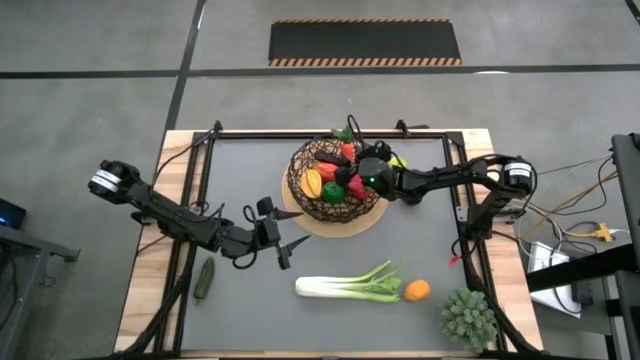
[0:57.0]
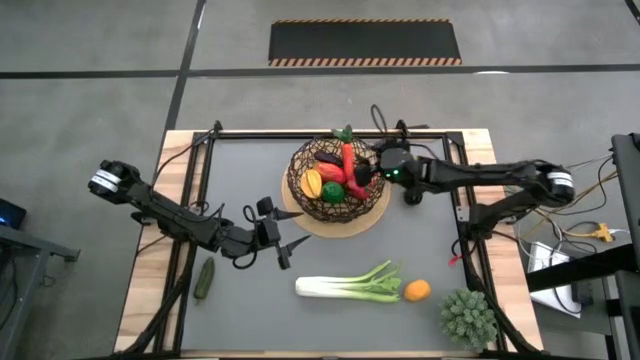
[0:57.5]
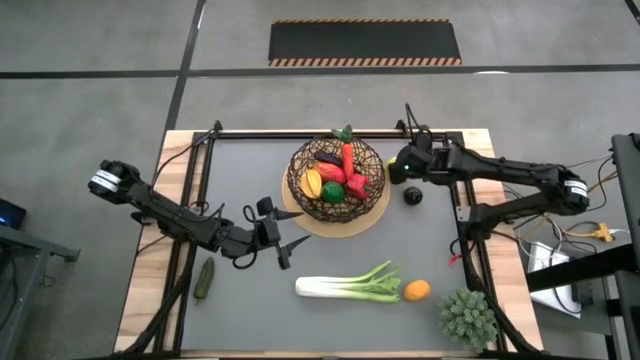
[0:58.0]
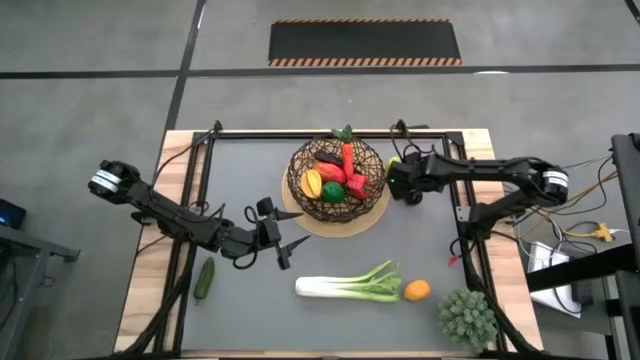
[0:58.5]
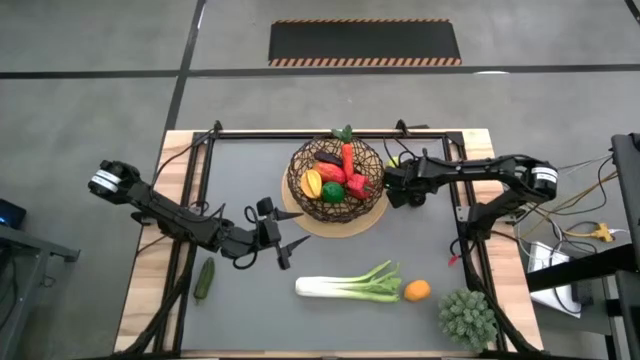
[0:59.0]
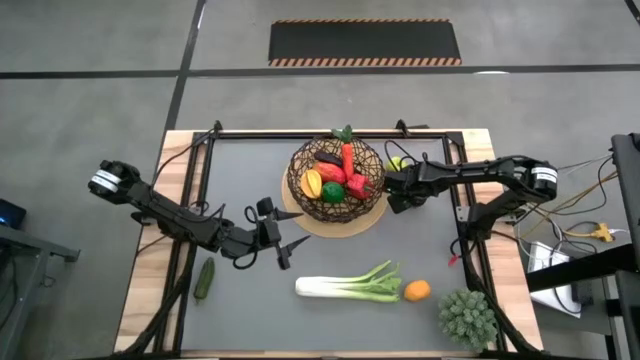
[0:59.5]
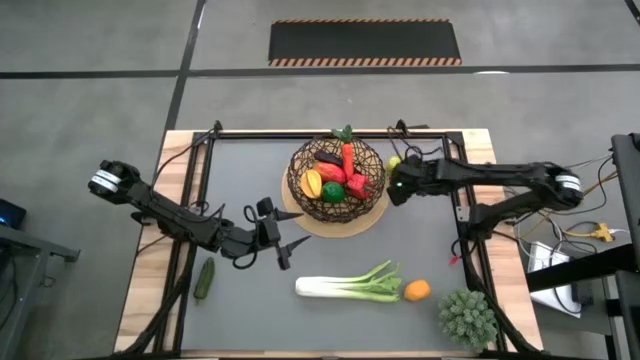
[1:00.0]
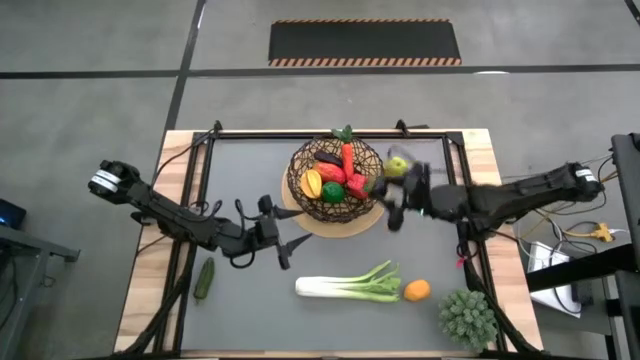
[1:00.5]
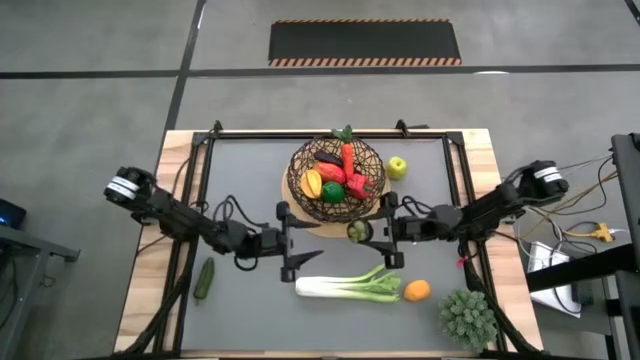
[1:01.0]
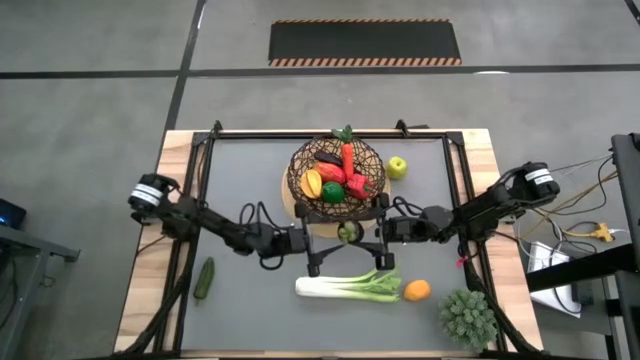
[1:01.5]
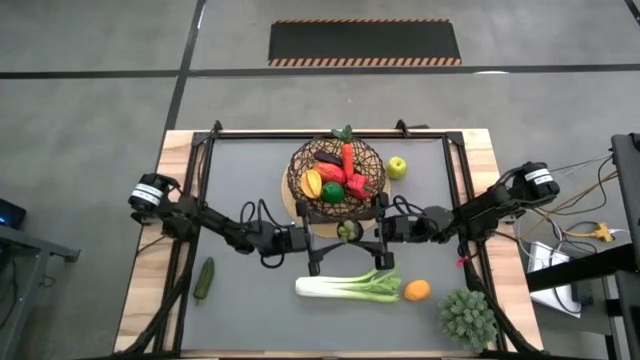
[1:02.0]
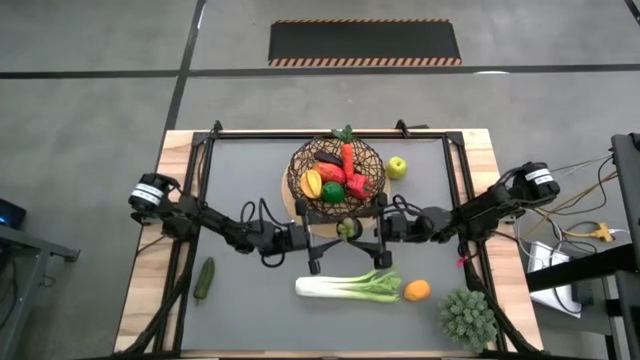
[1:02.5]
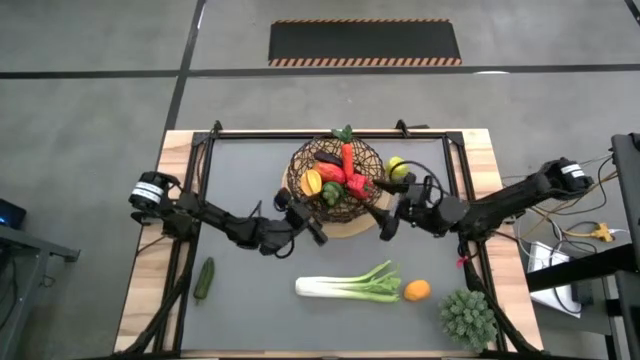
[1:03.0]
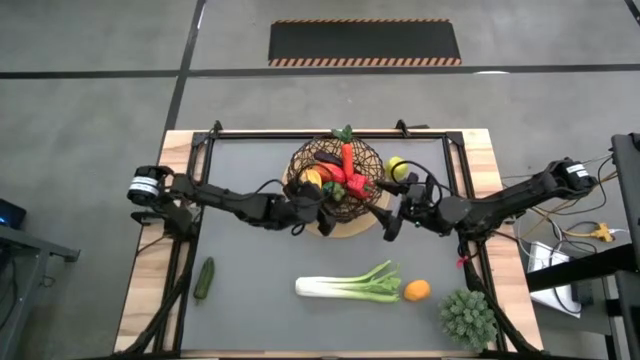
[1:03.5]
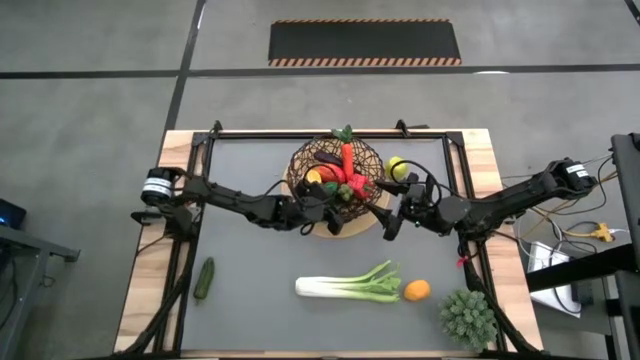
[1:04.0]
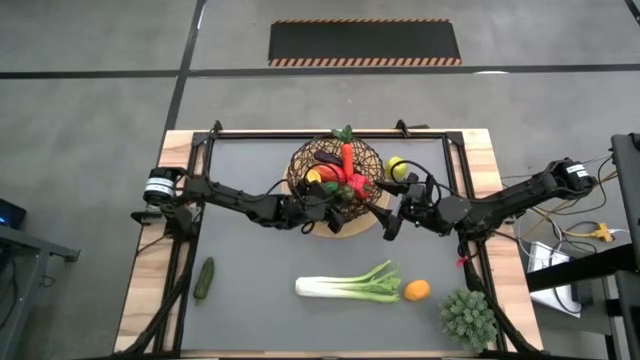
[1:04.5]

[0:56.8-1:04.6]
Task: Build produce basket
Put the plum into the basket

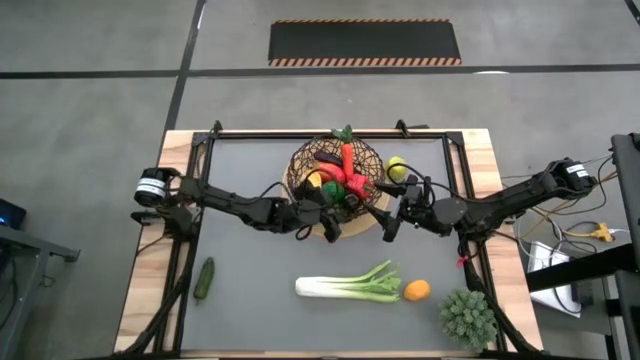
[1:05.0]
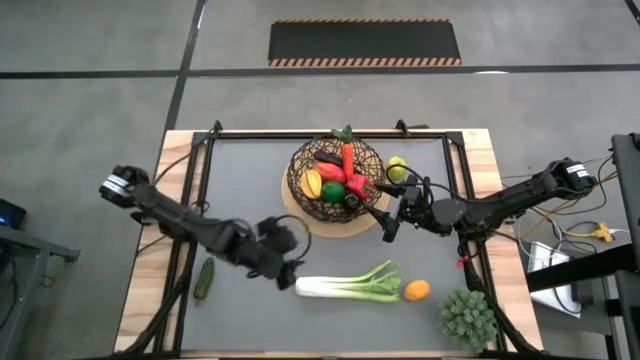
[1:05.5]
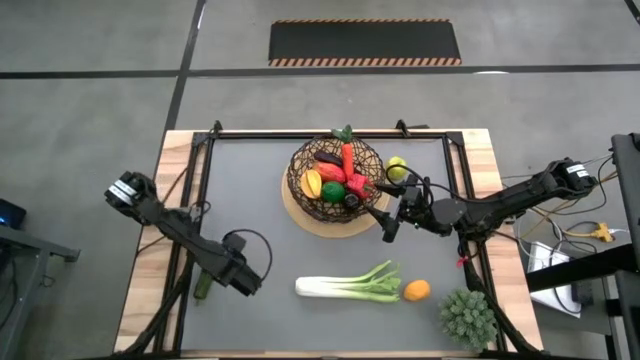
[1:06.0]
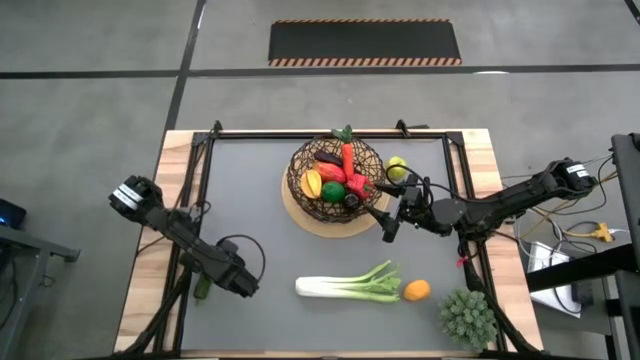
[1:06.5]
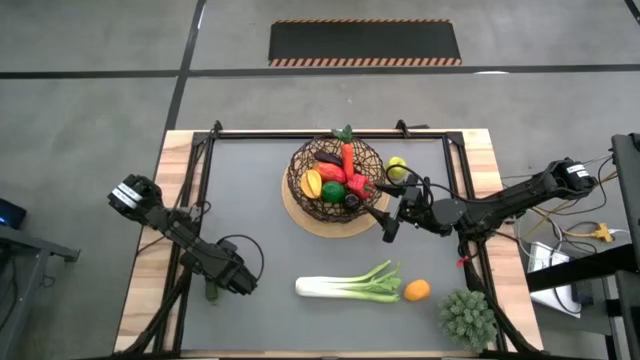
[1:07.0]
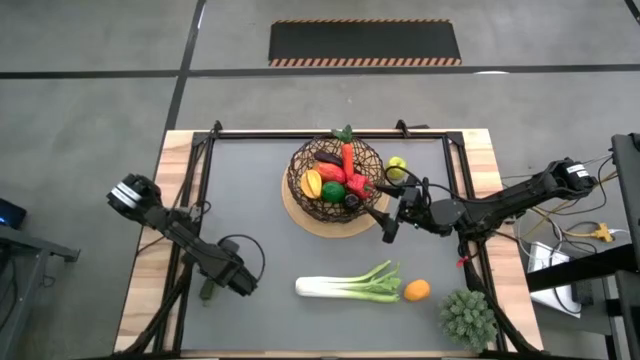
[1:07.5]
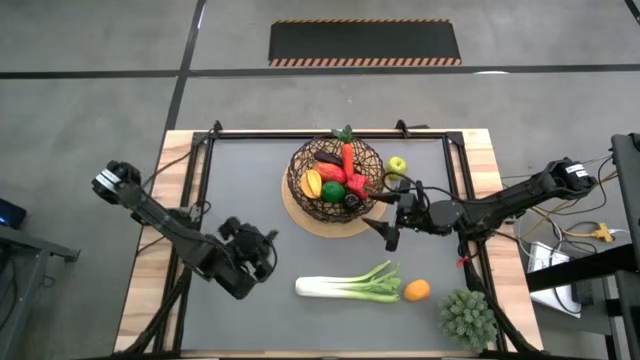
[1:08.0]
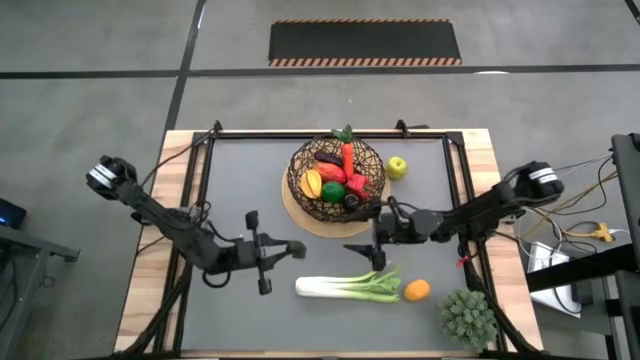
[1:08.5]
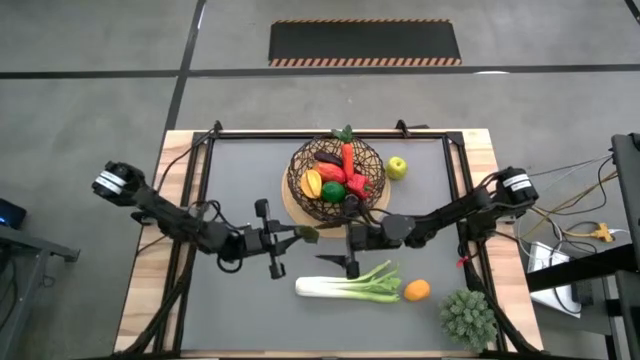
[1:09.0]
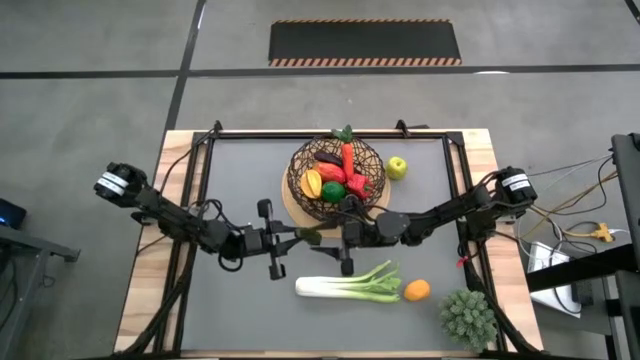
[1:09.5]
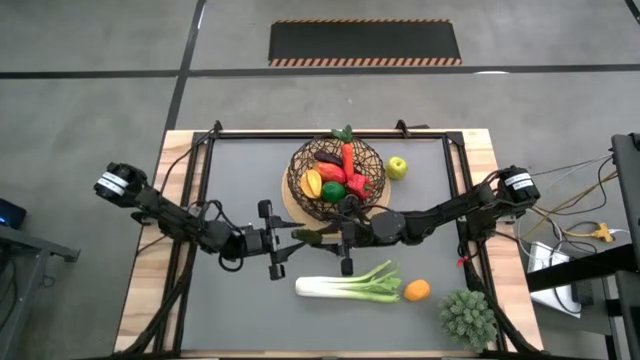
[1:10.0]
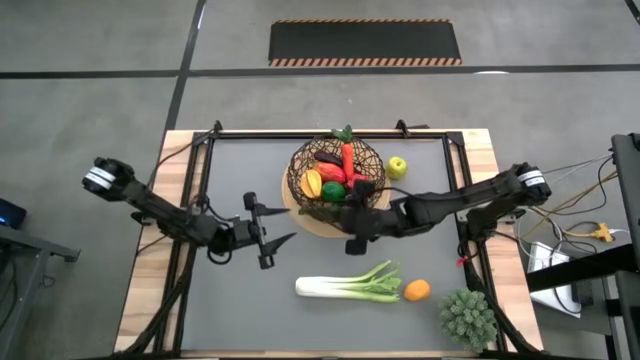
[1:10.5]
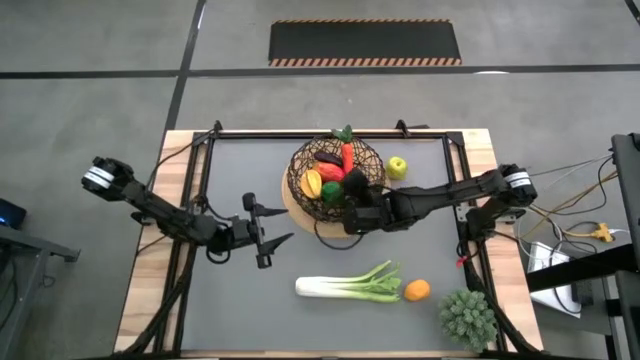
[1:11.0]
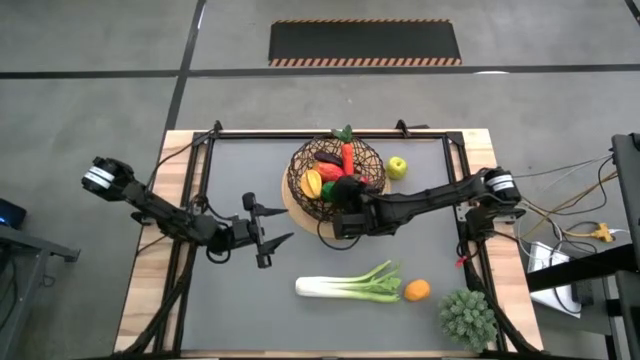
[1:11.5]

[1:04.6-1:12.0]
Put the chili pepper into the basket

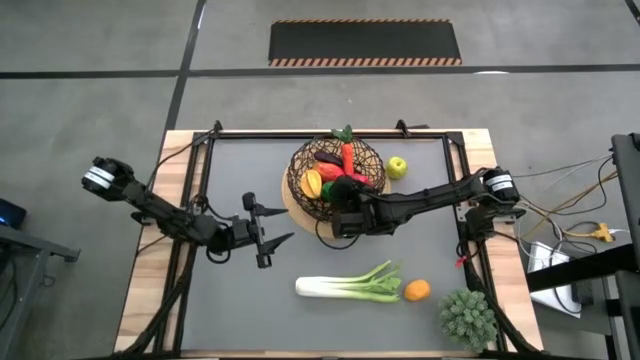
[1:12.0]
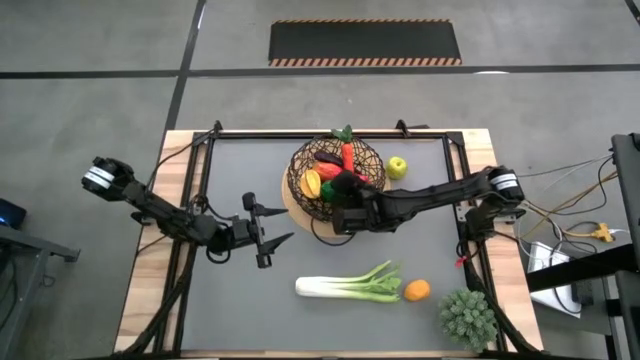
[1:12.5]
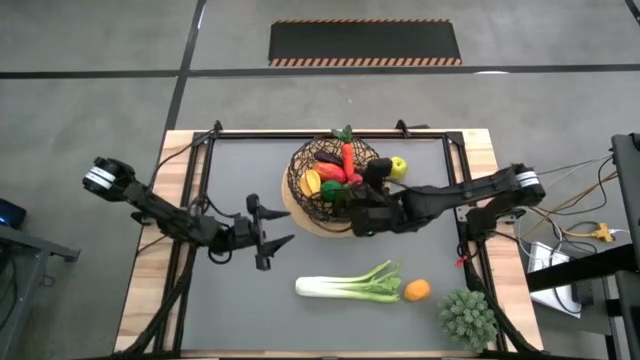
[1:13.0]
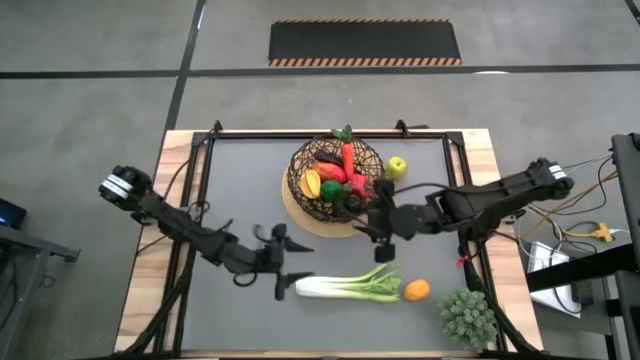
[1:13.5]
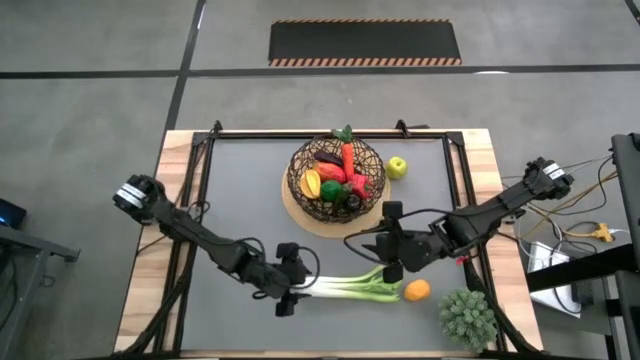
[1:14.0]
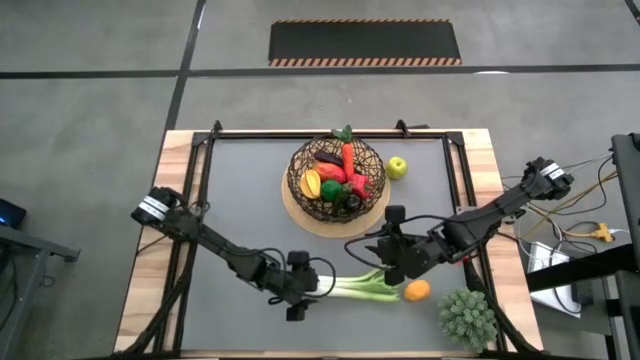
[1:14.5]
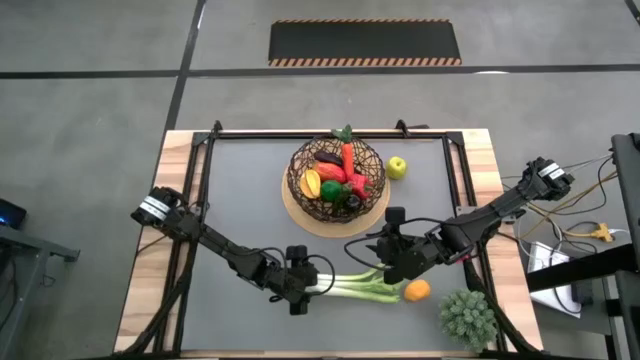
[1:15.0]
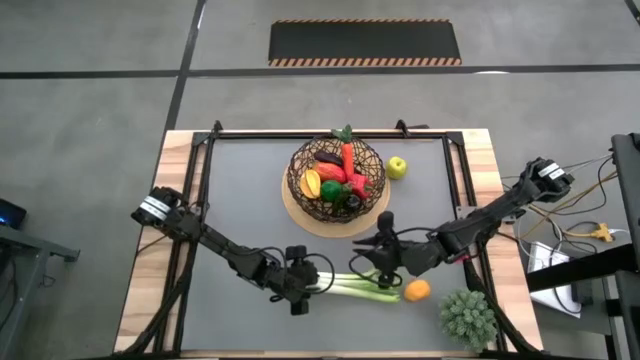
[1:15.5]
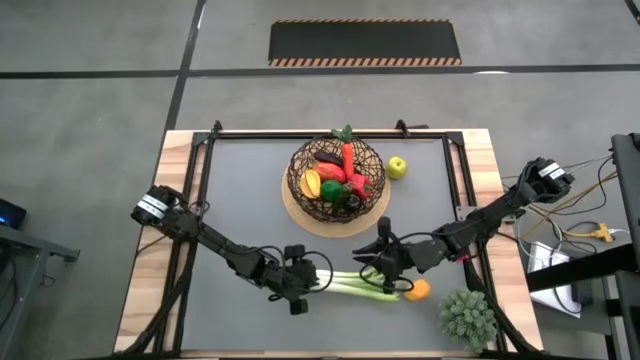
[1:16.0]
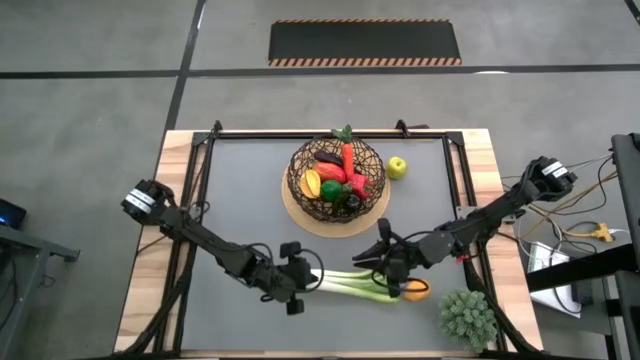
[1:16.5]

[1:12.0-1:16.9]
Put the celery into the basket
